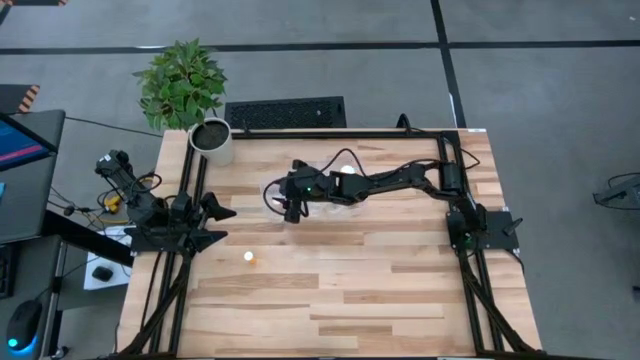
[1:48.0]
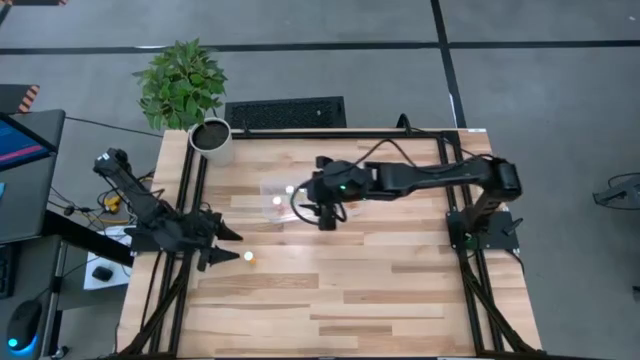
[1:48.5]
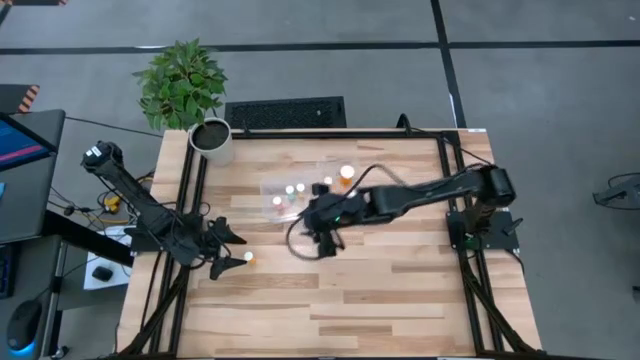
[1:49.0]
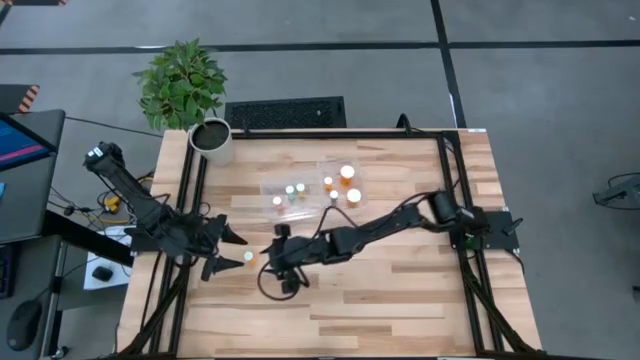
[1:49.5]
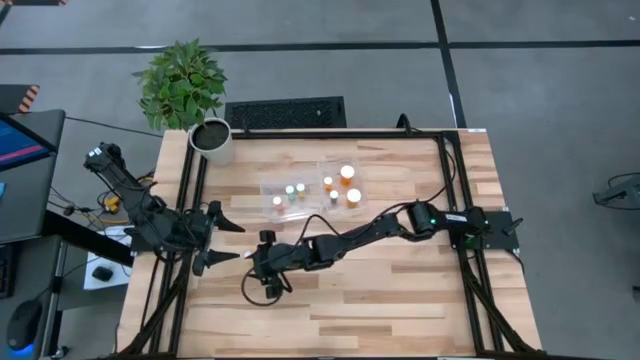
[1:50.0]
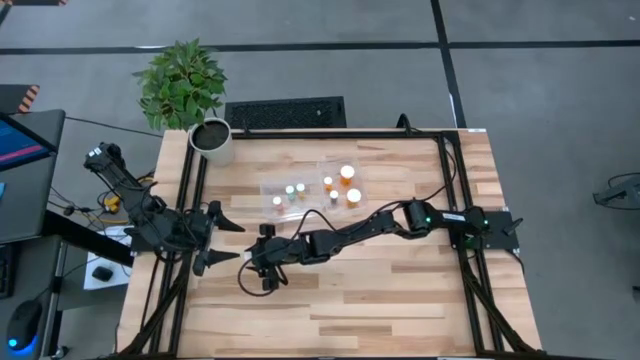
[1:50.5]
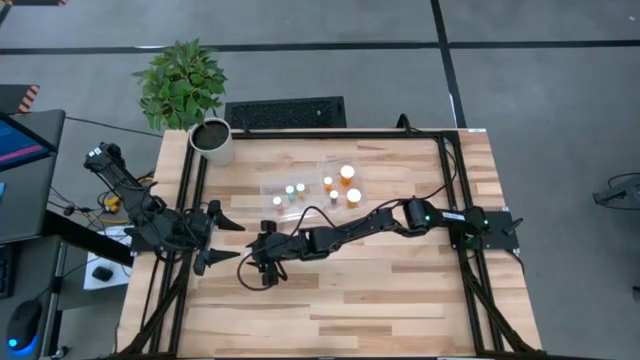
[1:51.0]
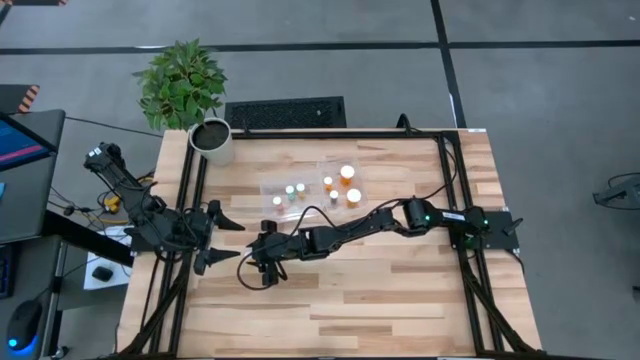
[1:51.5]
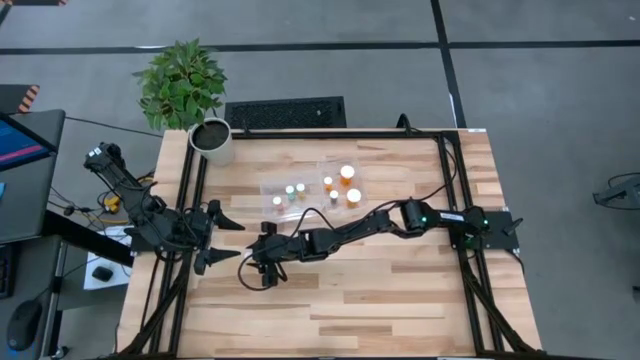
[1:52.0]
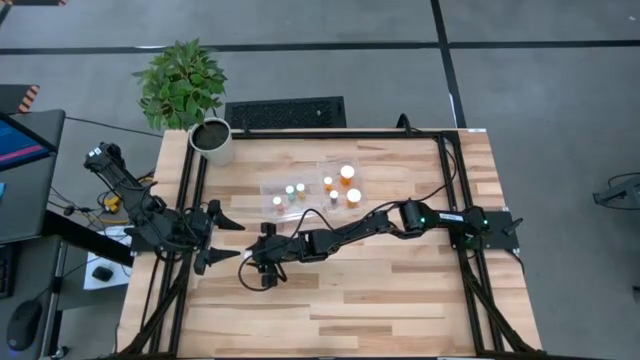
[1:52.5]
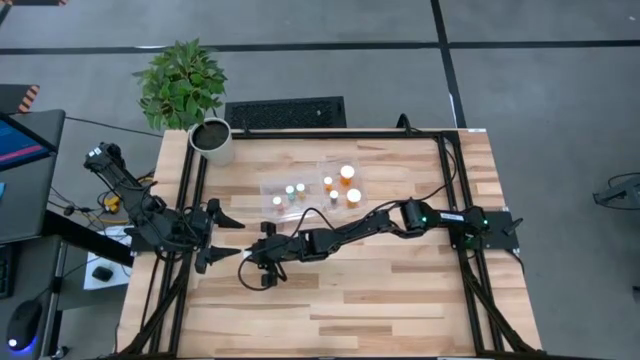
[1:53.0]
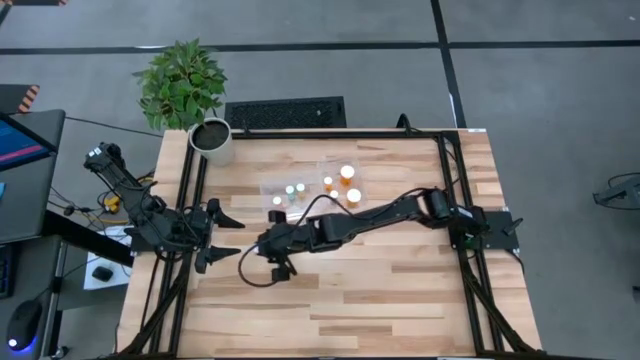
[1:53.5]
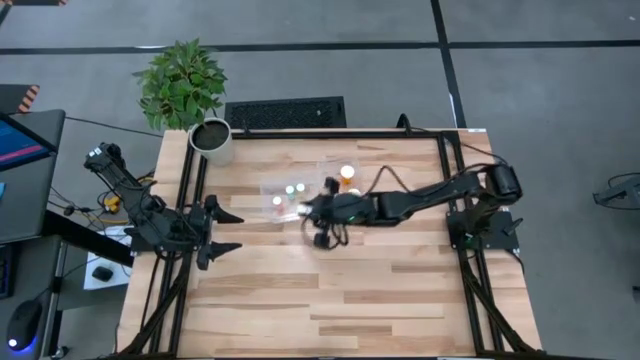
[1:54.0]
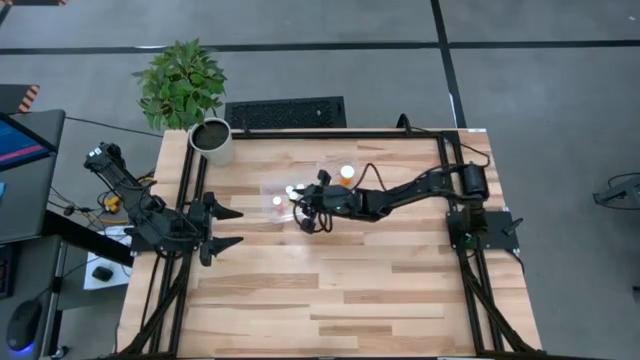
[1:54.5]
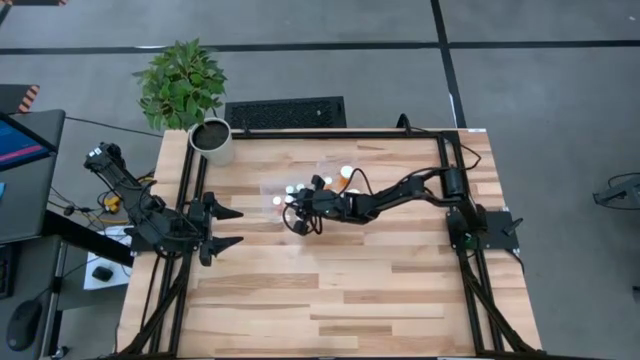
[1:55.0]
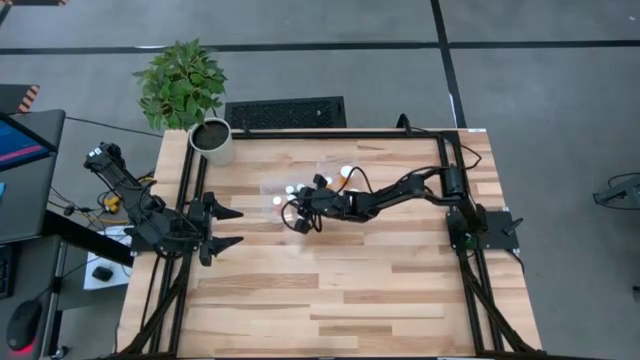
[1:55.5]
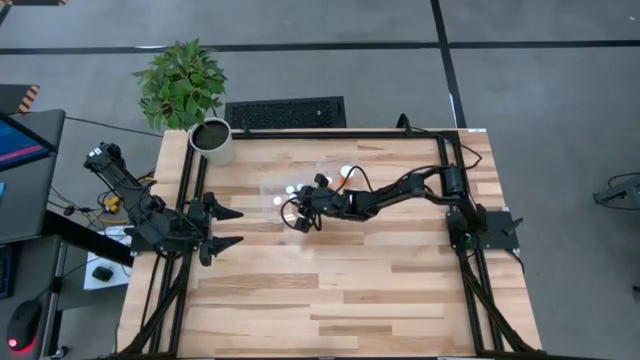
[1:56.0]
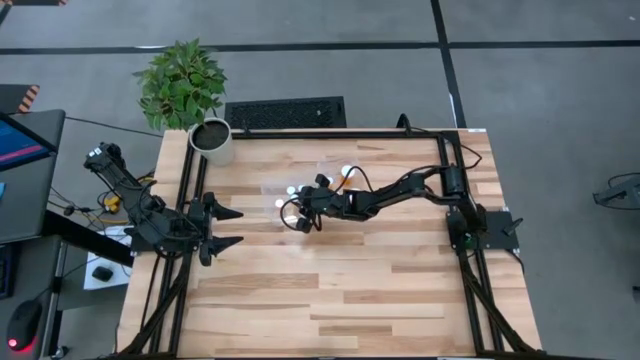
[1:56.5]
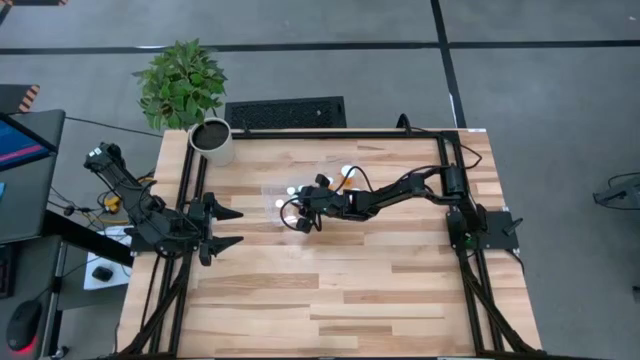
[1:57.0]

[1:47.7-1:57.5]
Task: Pick and place medicine bottles into bin by pill shape (circle, oval)
Put the orange tablet bottle into the left transparent bin

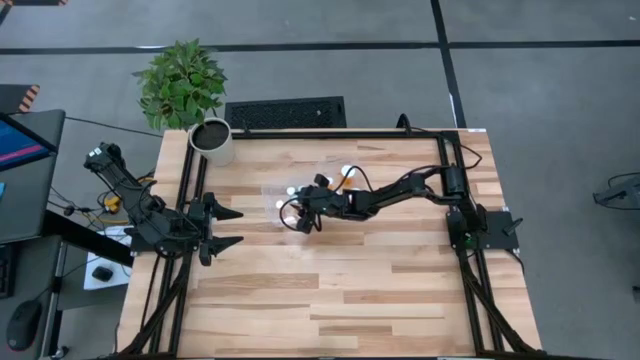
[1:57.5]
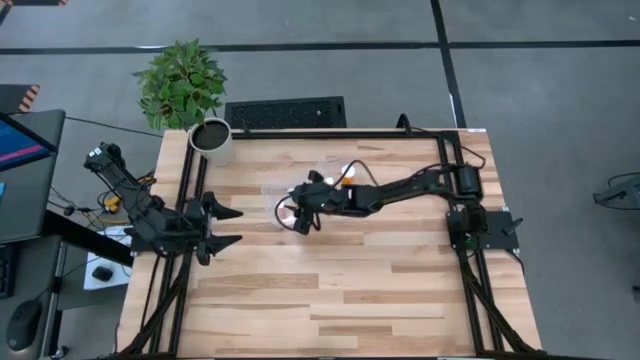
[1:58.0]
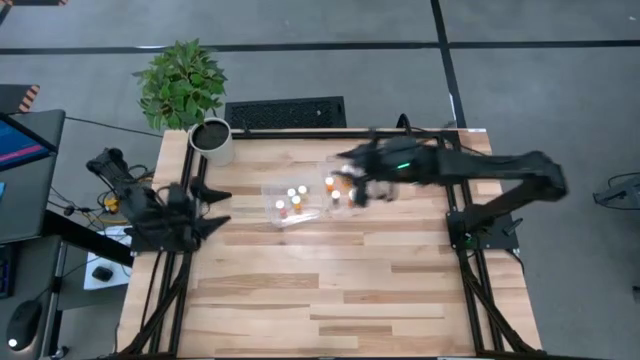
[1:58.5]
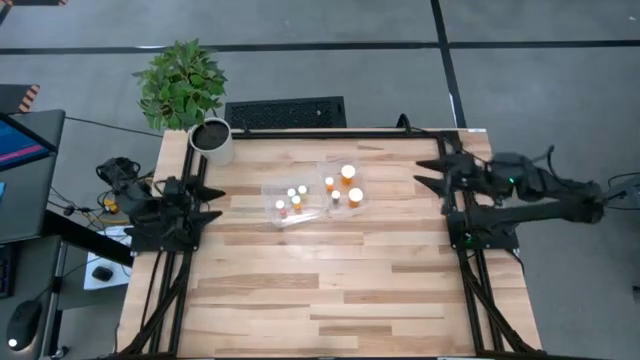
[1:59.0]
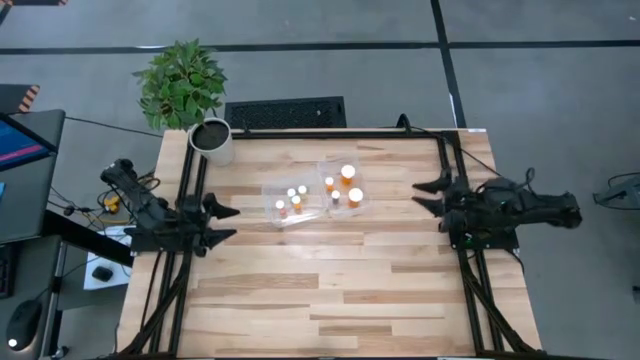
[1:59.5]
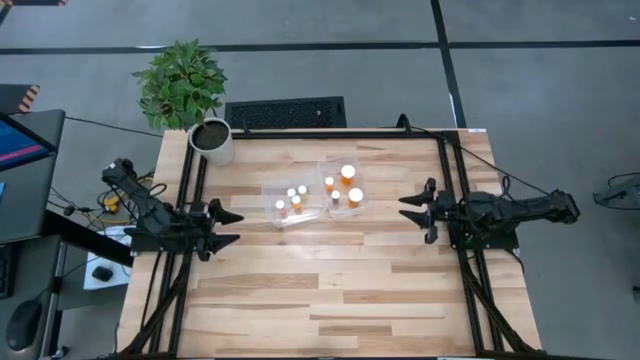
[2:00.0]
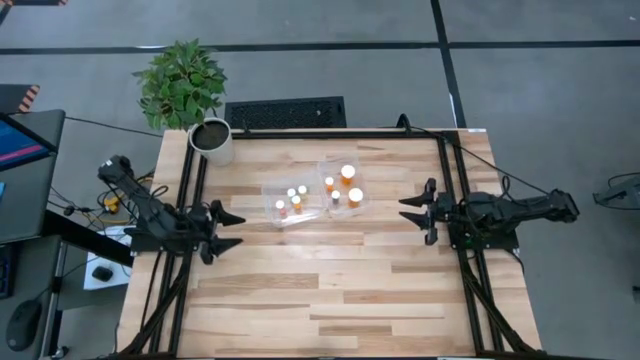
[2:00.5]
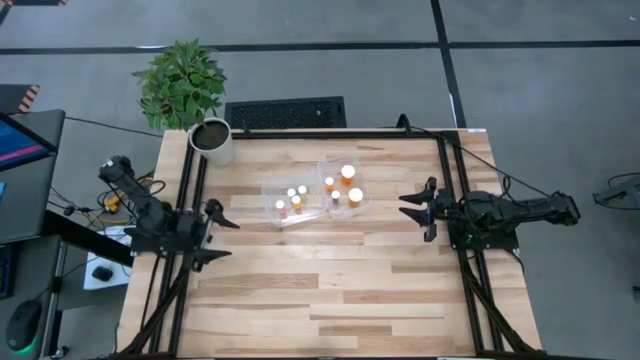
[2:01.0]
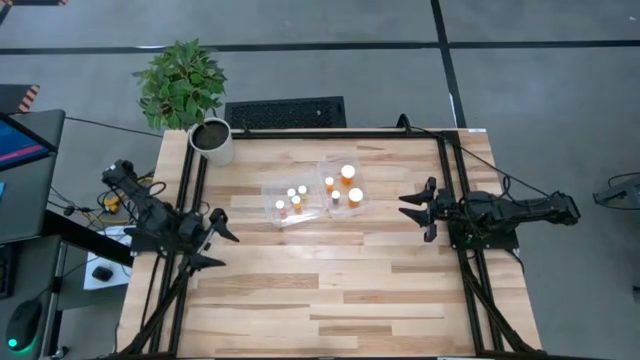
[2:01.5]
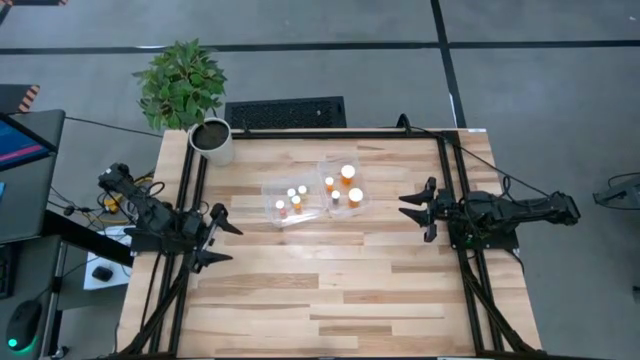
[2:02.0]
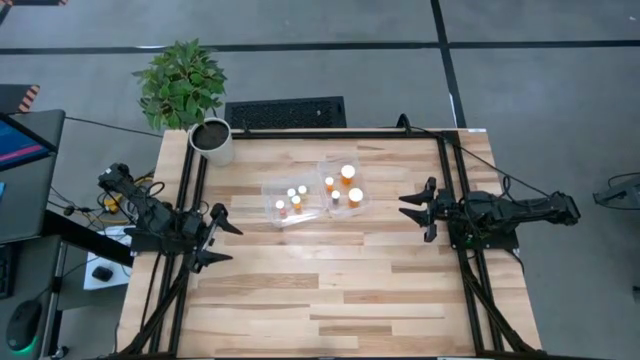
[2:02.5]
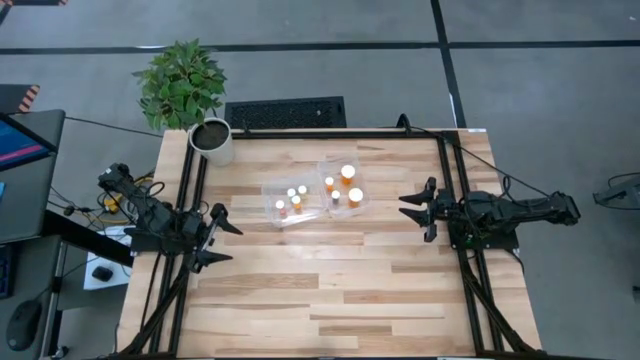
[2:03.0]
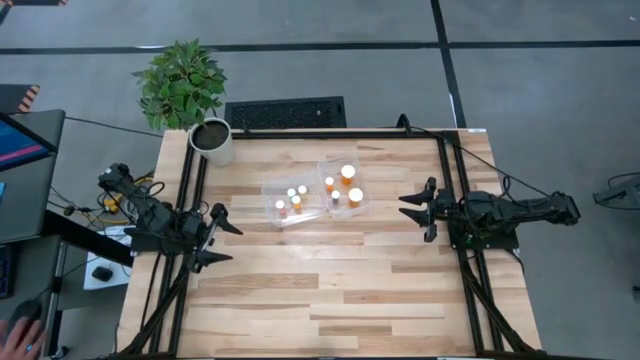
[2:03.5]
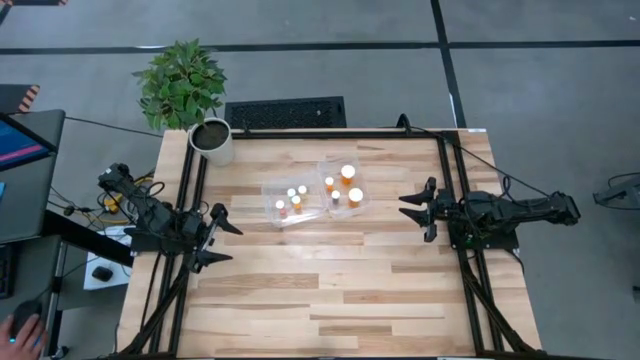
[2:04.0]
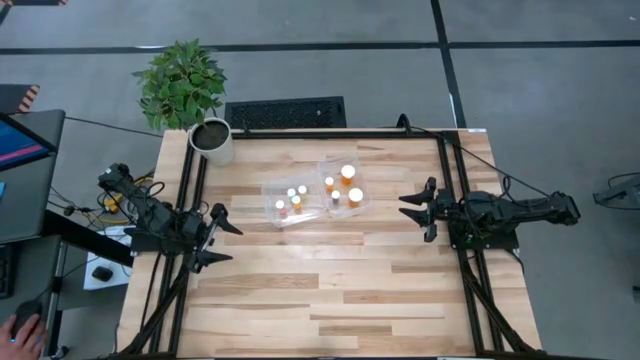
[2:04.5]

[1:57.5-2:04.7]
Return to Home Position

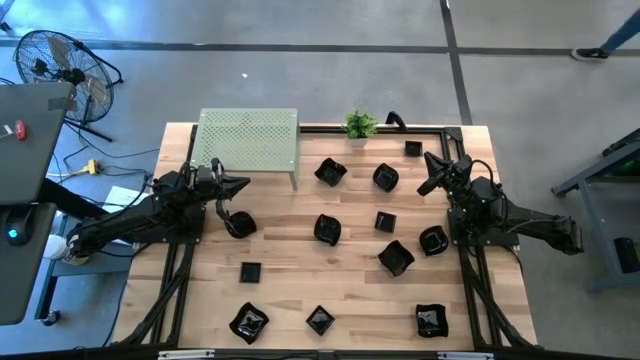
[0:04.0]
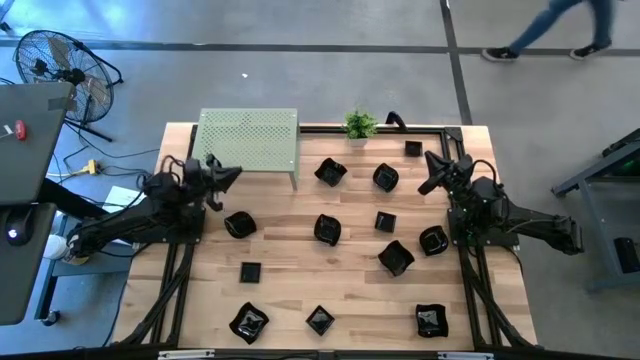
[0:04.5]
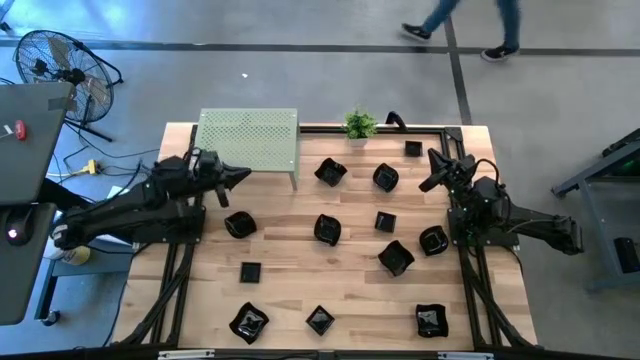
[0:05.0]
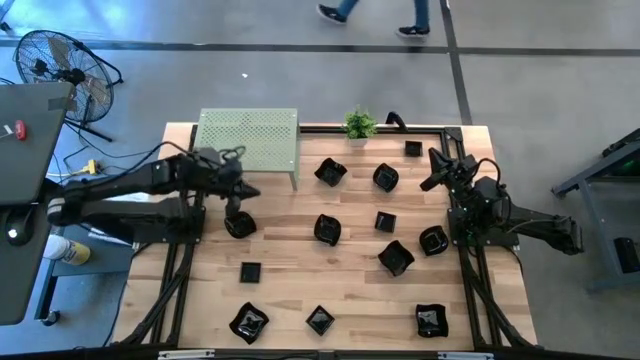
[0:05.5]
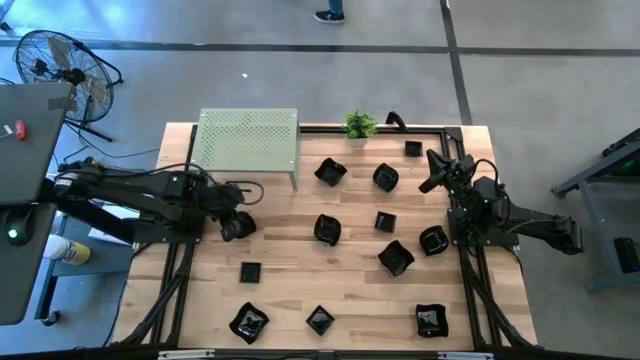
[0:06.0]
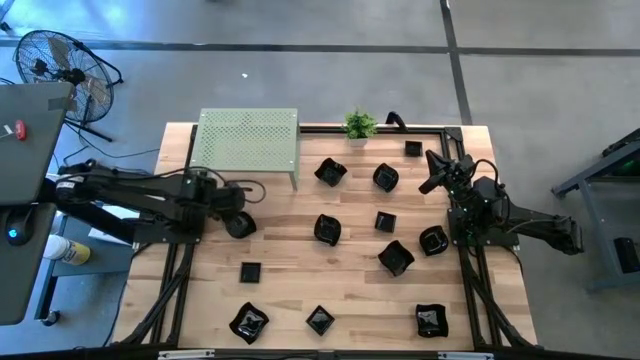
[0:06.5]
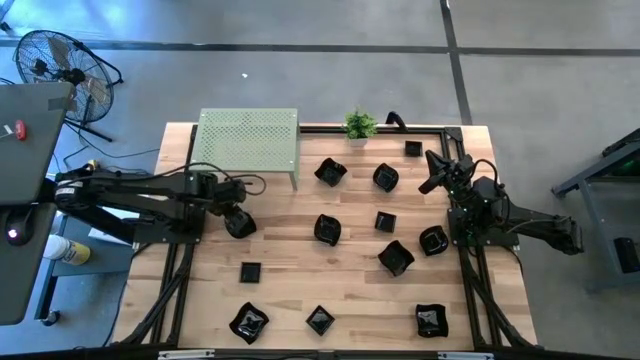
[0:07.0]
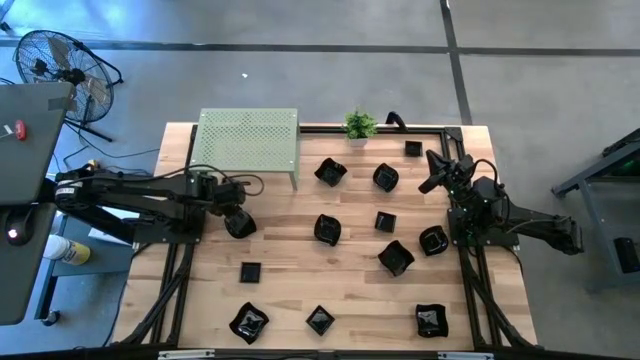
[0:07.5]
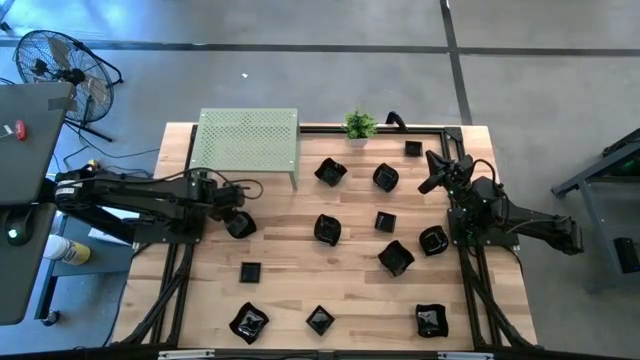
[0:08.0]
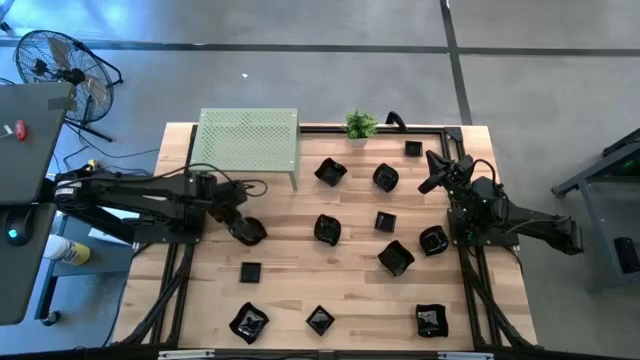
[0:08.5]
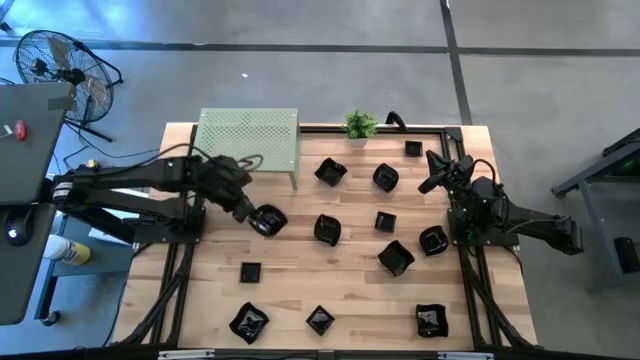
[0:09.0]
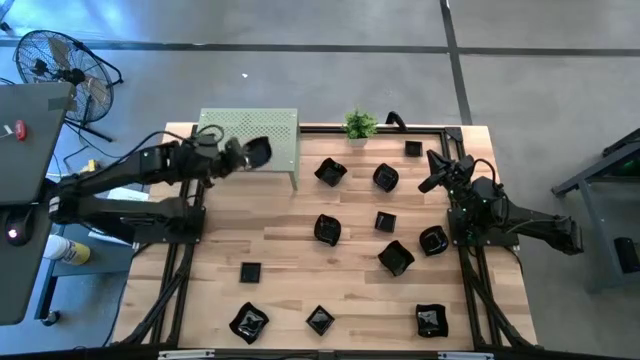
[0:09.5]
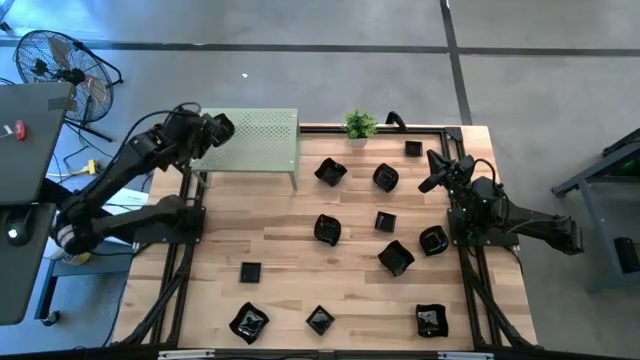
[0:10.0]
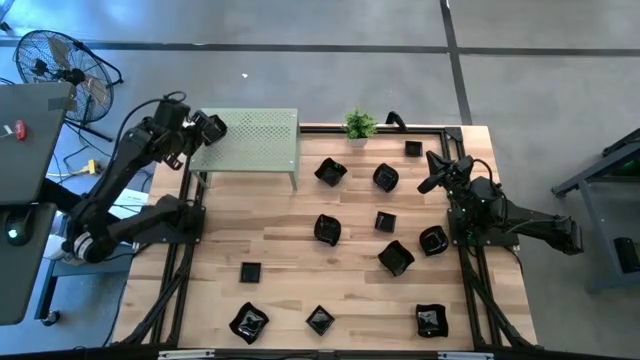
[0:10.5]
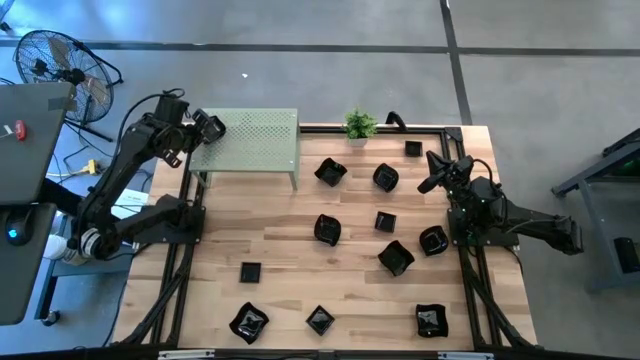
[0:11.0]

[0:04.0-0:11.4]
Task: Pick & Place Mini shaped plates
Put the black leaf-shaped plate on the left shelf
